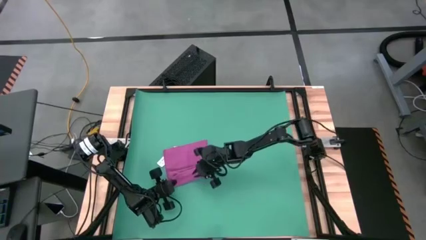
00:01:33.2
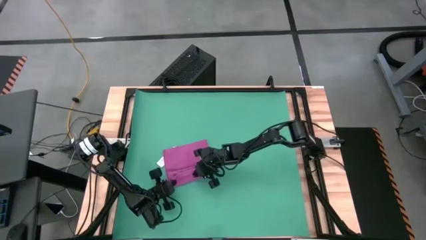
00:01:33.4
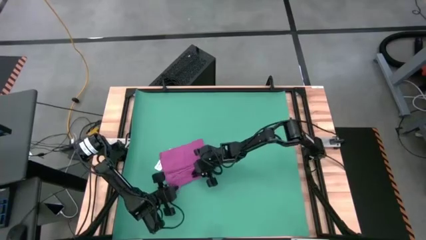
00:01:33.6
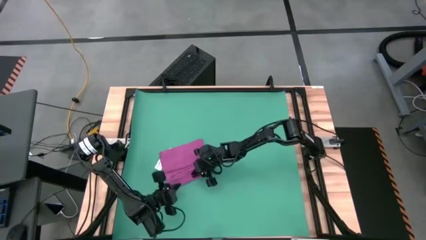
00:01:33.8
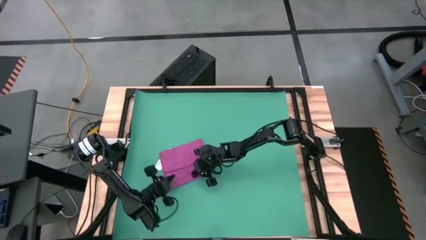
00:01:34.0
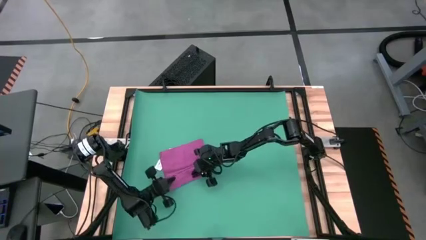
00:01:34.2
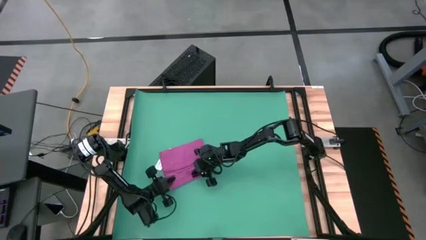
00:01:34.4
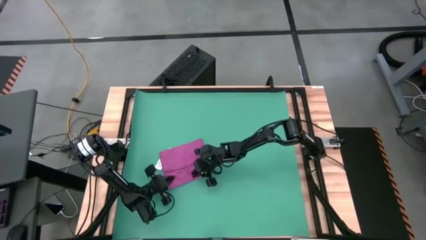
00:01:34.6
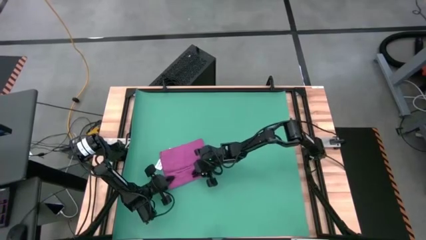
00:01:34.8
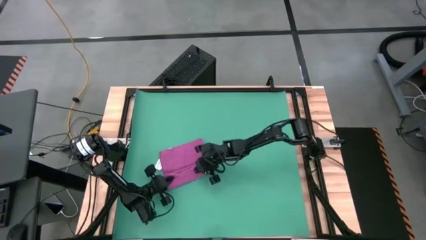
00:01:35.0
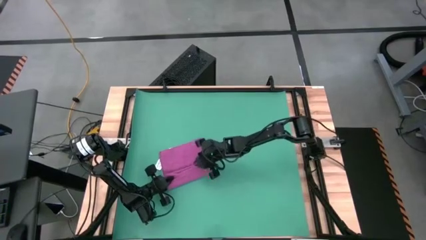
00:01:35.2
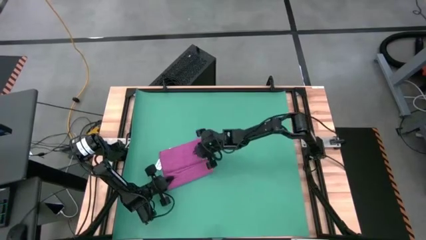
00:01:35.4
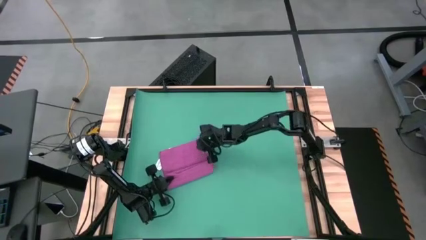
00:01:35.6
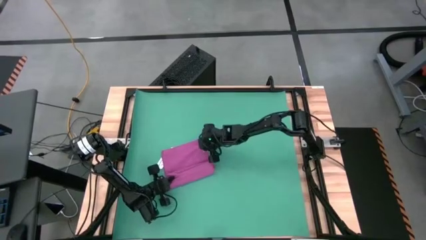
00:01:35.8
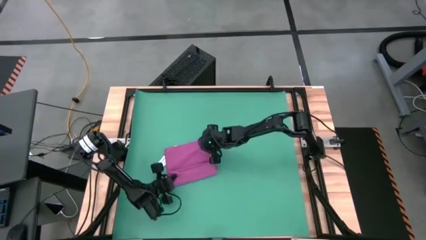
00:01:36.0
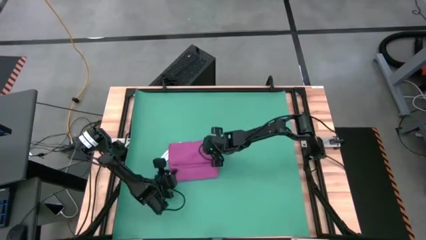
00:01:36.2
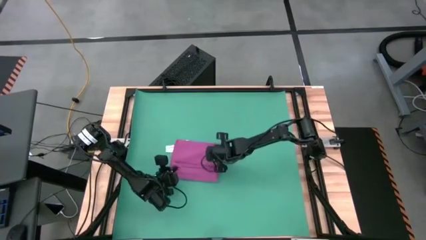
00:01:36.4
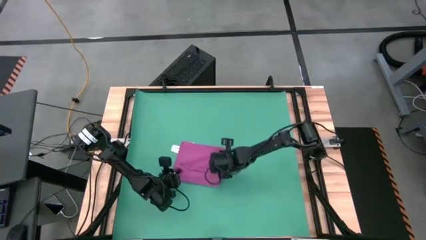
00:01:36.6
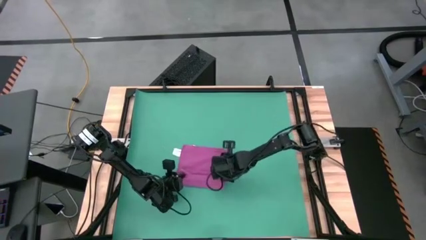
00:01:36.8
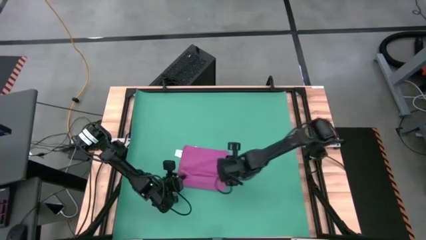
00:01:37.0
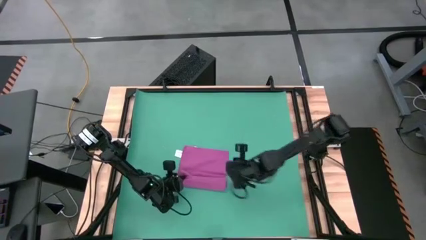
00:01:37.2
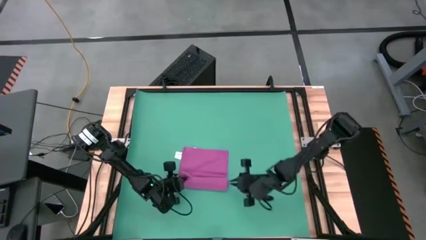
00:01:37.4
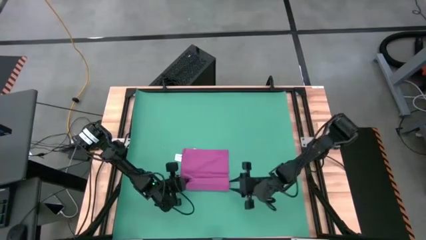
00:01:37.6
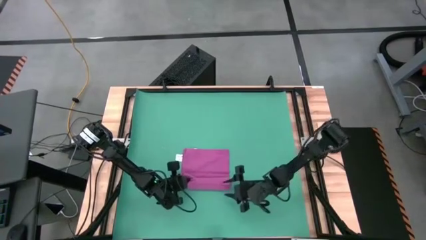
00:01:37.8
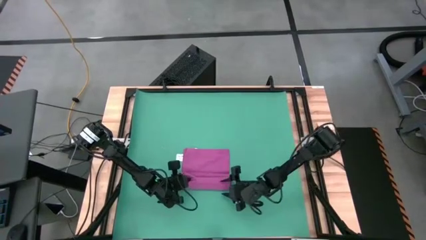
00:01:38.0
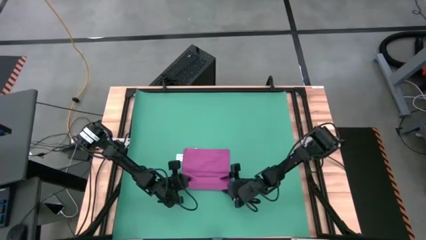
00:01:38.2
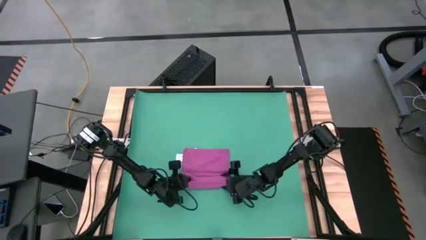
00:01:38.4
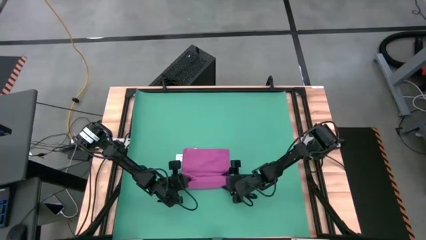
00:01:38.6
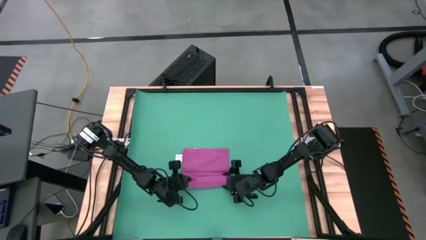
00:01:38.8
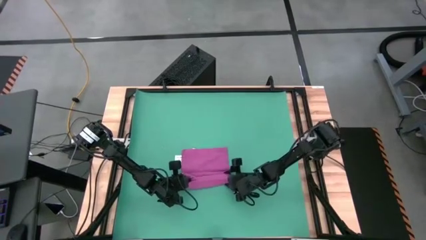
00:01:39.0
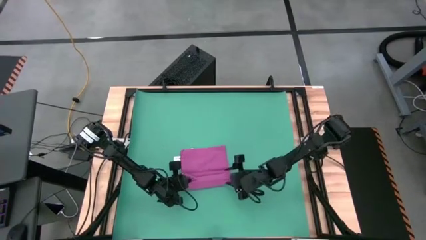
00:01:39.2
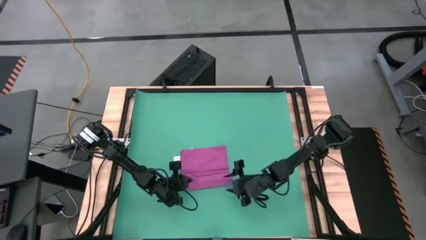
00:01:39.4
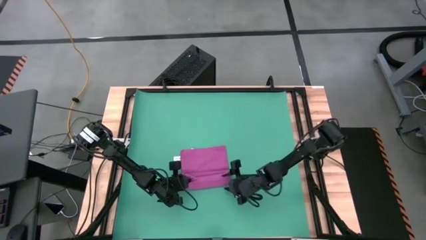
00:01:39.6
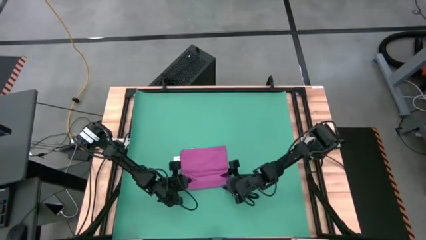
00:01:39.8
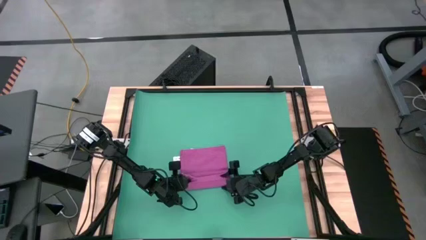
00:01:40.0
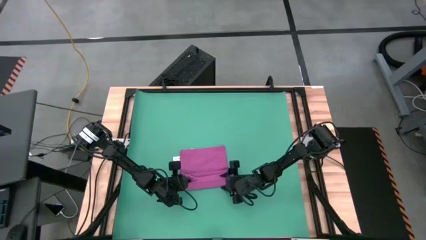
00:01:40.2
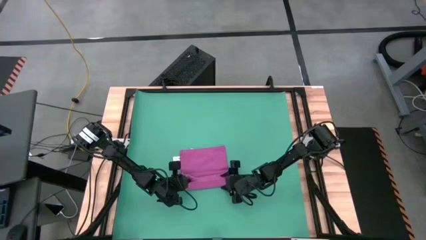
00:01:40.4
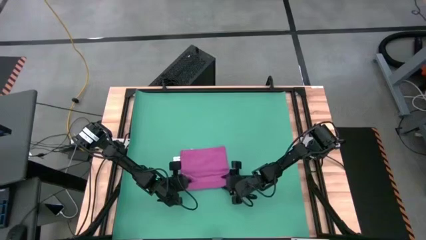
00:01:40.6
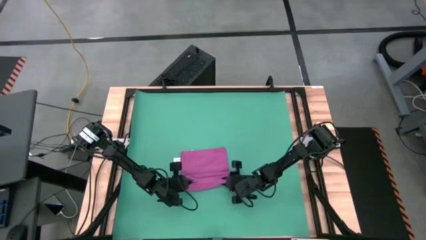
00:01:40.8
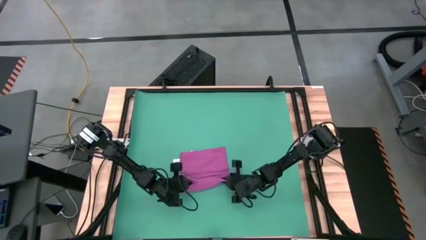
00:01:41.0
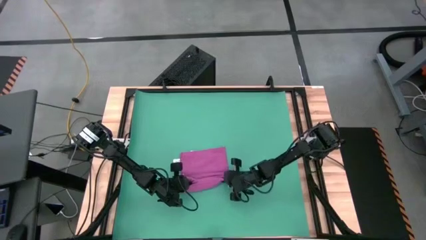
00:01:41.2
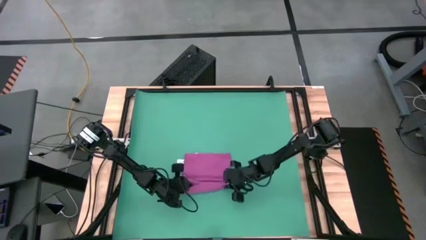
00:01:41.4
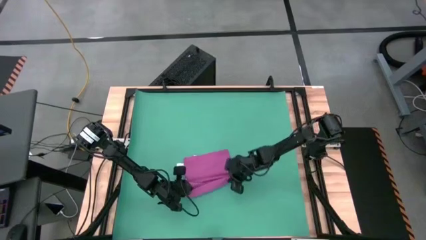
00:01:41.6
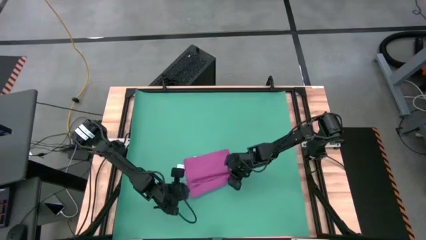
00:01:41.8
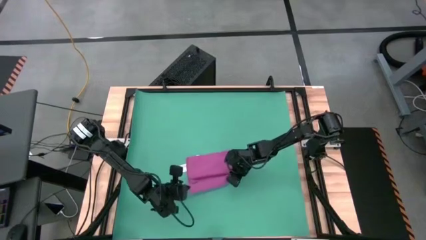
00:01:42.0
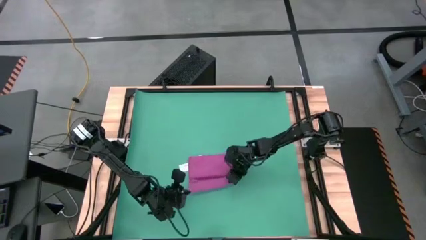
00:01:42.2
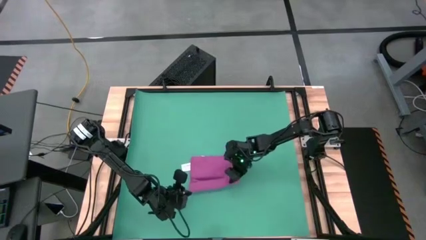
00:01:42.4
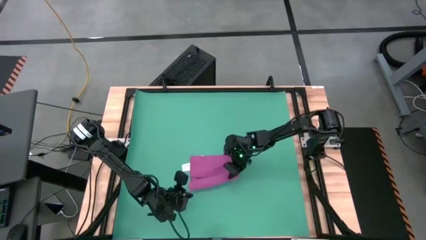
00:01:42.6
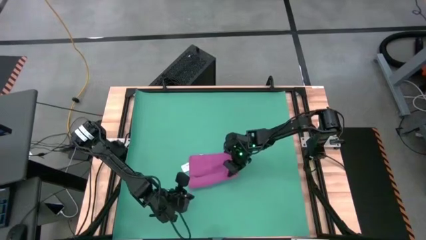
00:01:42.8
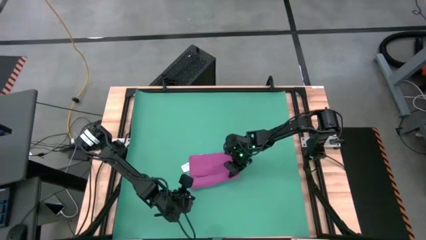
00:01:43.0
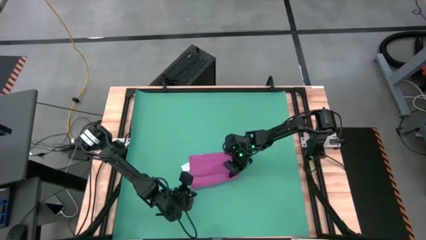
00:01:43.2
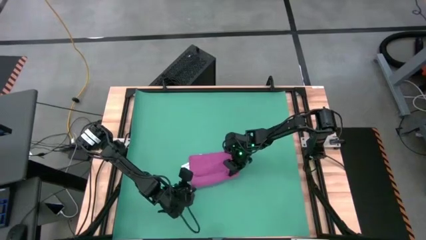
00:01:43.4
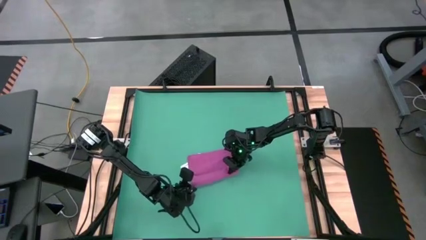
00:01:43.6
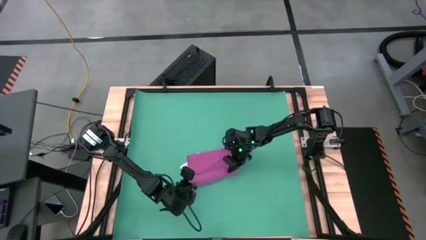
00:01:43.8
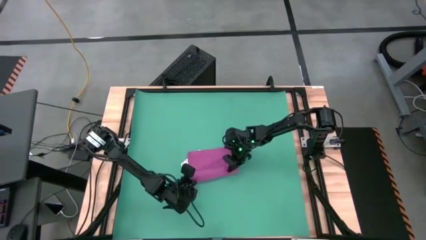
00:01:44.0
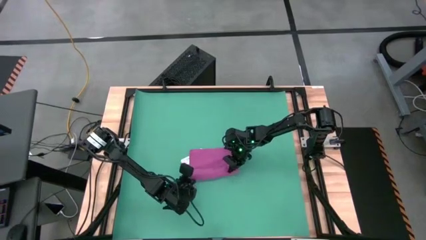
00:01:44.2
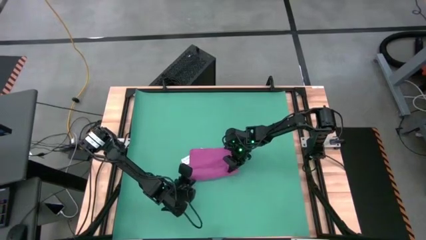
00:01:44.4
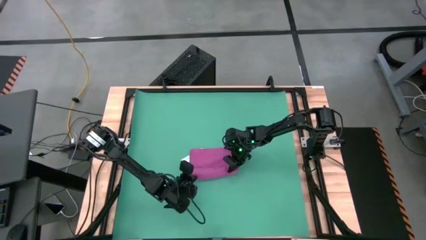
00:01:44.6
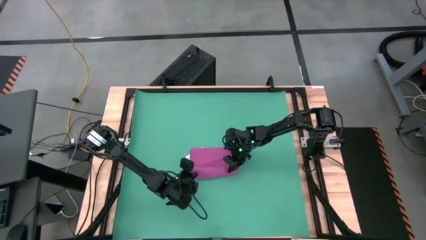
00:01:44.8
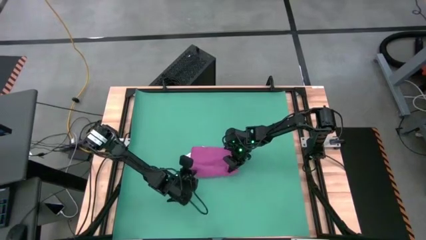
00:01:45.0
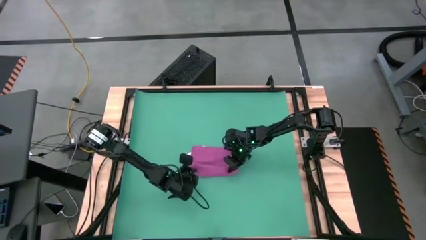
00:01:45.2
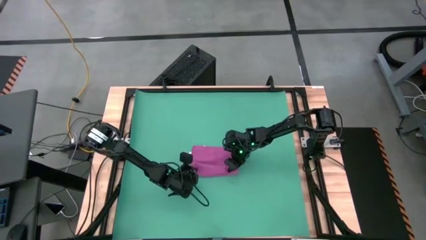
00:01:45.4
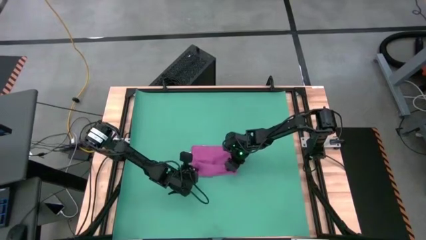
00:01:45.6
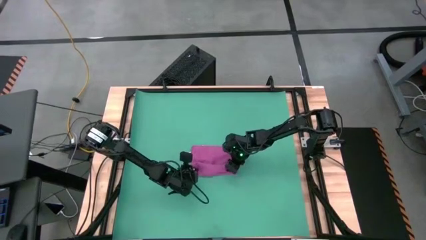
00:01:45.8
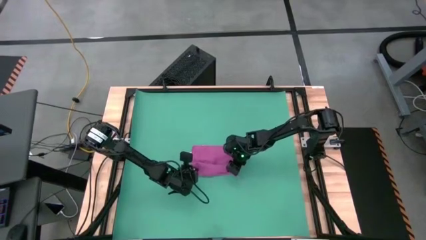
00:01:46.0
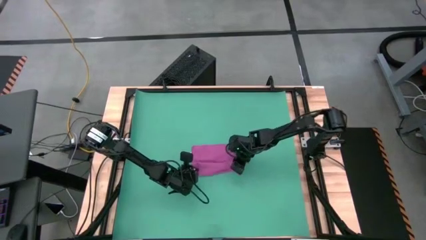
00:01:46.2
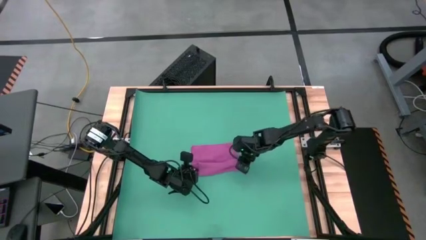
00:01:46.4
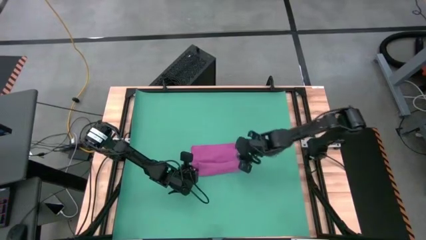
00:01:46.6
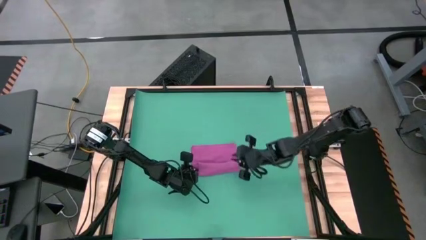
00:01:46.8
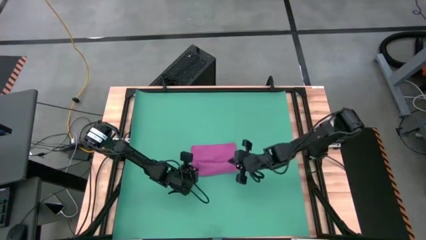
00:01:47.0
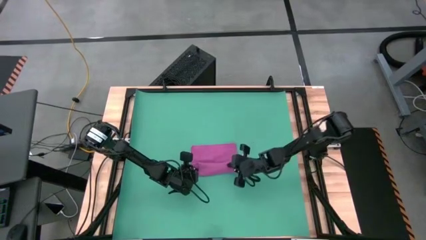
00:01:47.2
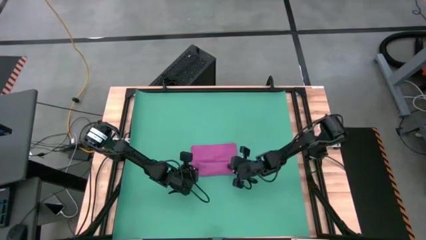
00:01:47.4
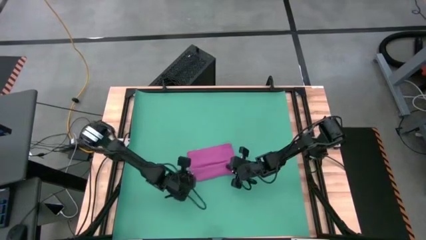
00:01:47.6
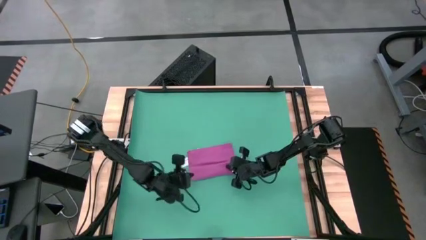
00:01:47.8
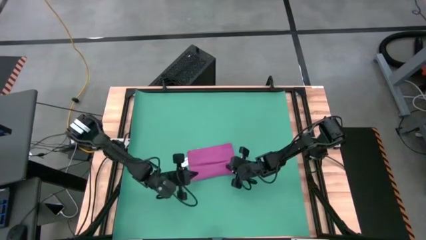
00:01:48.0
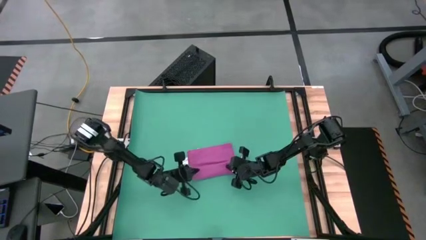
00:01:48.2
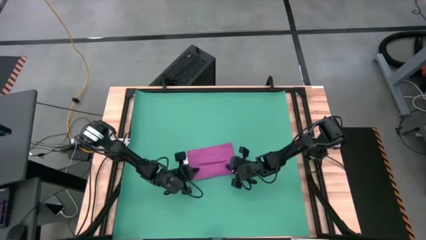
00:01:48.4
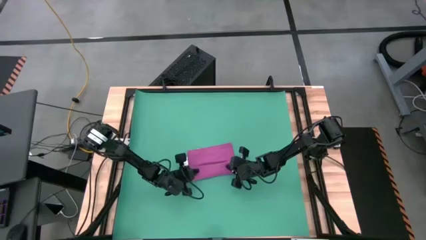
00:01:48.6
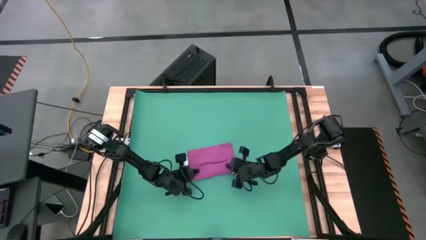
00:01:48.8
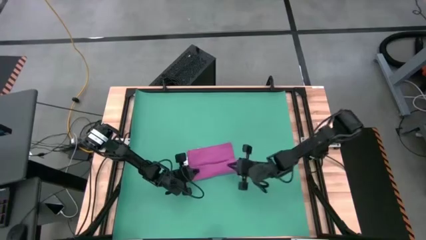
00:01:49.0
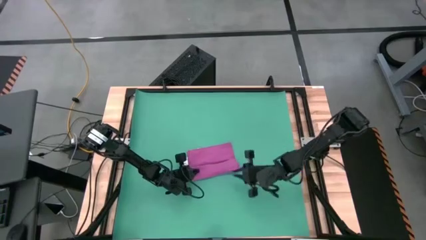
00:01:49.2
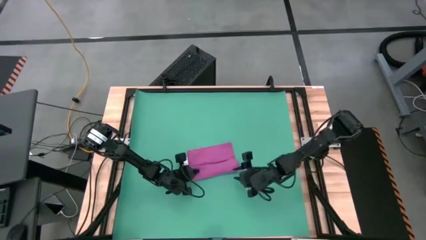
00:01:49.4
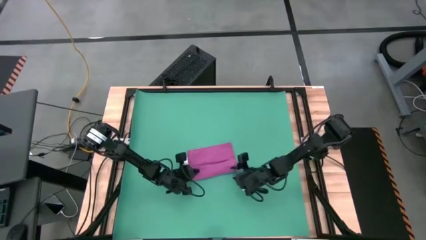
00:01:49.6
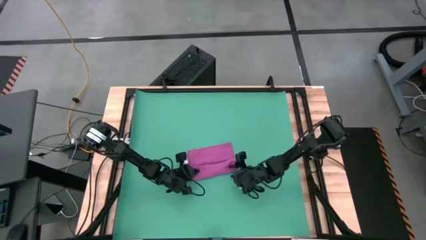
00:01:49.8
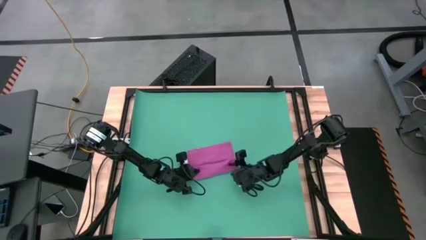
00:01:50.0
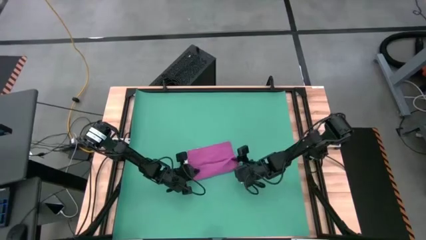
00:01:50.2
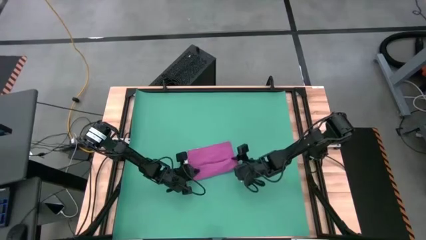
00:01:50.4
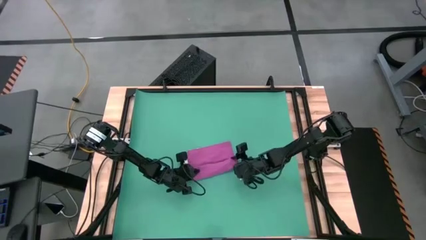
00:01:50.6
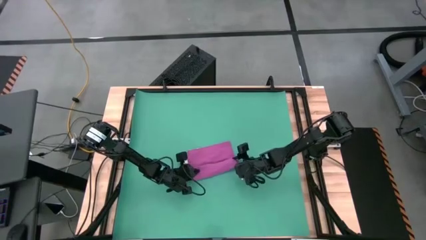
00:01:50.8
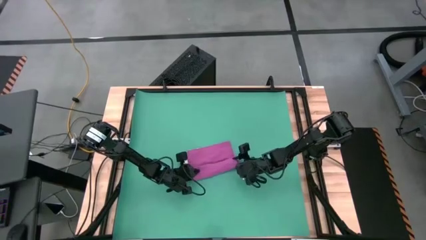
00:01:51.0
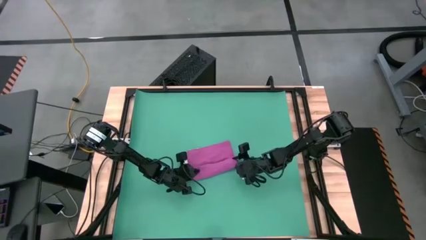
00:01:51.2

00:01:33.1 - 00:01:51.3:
Task: Roll towel
Roll the pink towel
